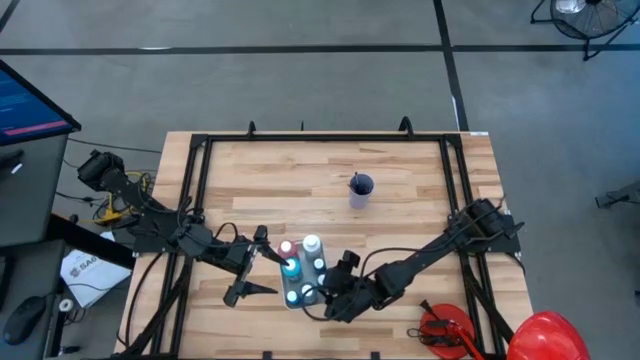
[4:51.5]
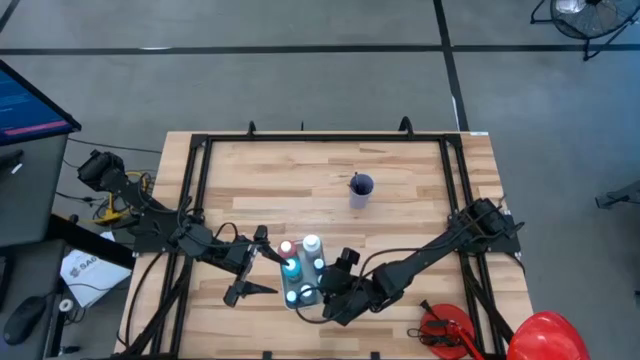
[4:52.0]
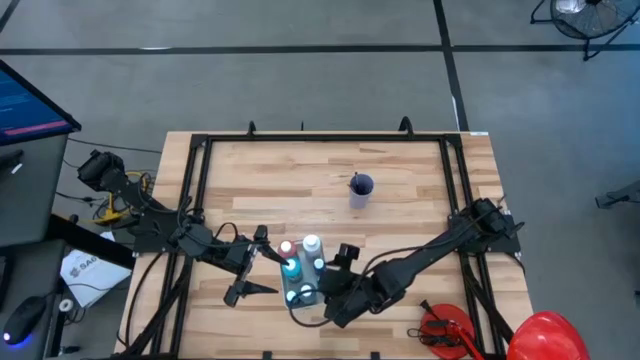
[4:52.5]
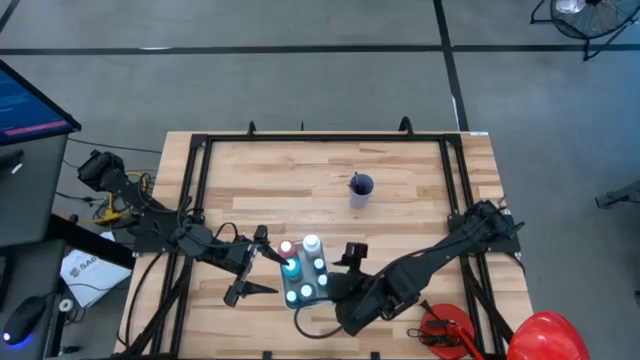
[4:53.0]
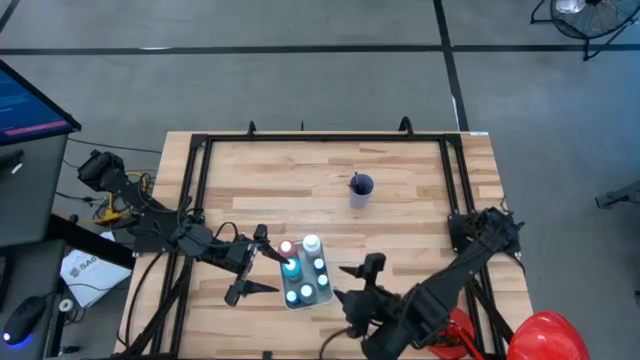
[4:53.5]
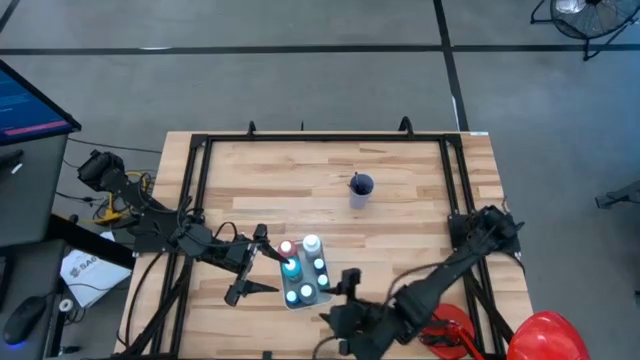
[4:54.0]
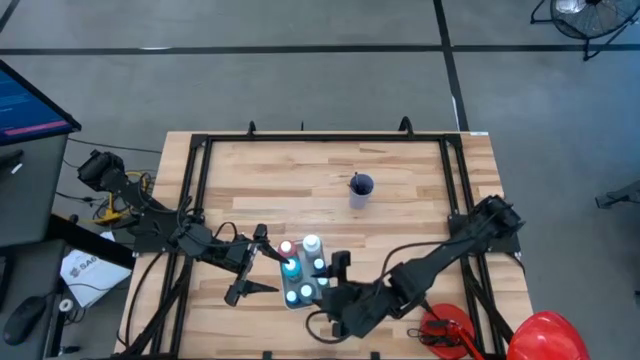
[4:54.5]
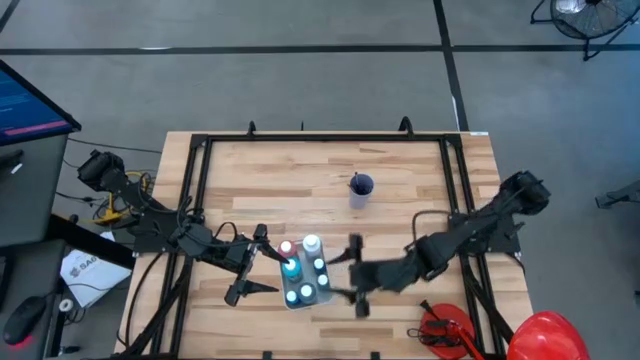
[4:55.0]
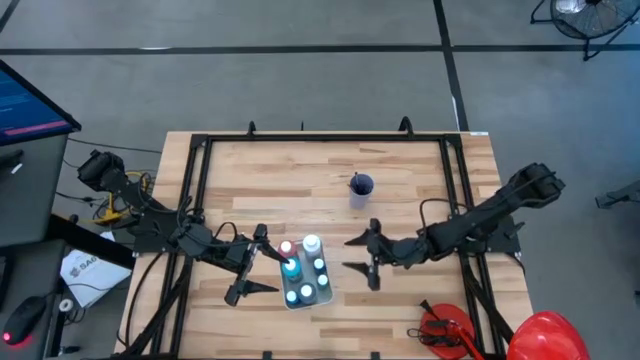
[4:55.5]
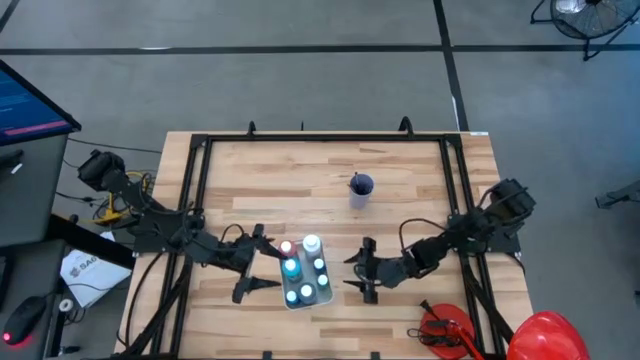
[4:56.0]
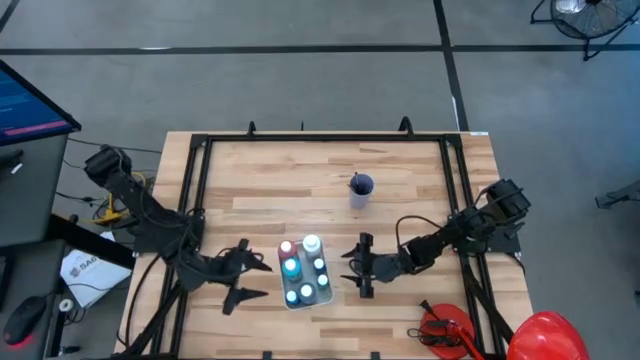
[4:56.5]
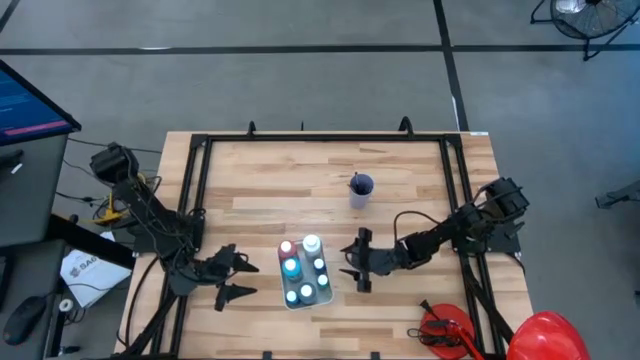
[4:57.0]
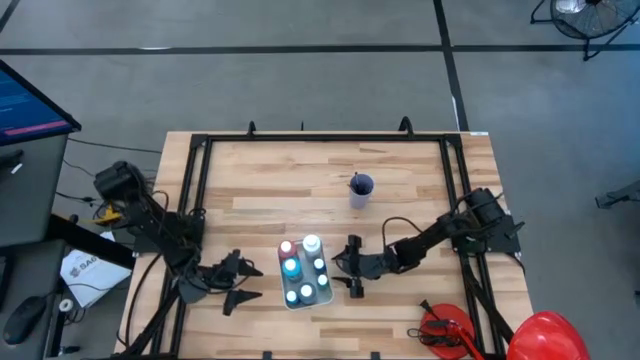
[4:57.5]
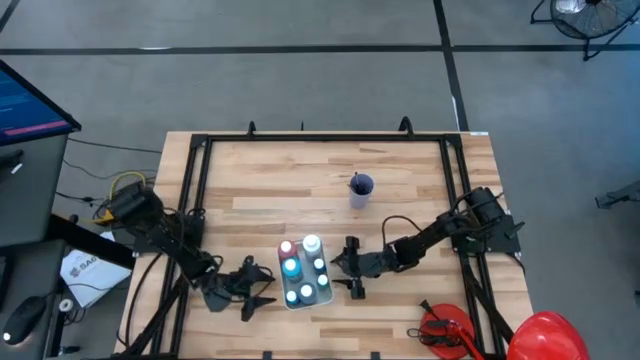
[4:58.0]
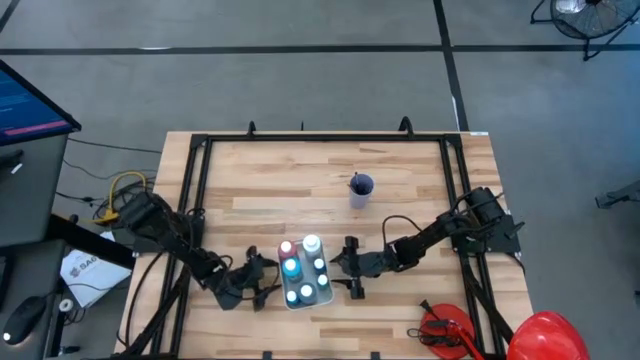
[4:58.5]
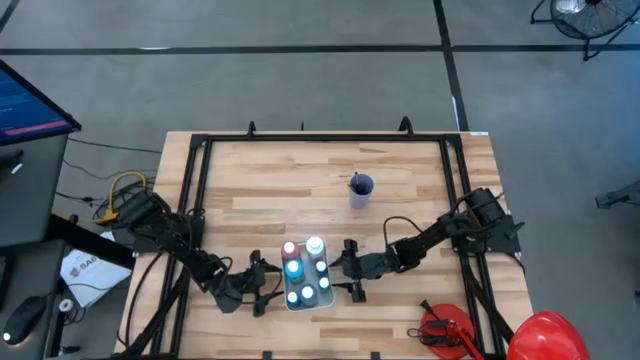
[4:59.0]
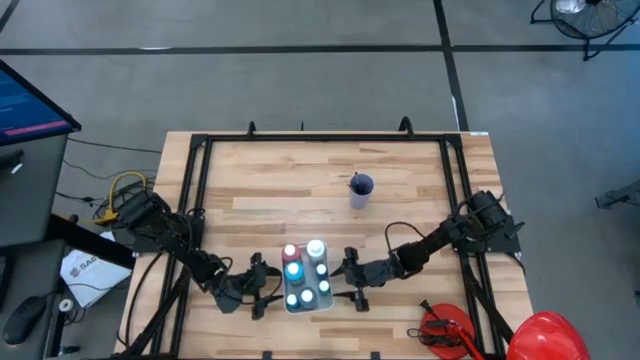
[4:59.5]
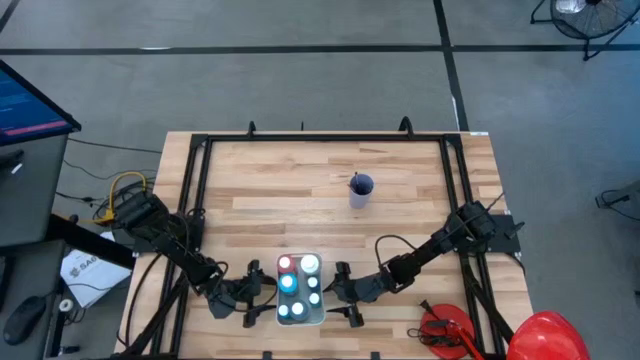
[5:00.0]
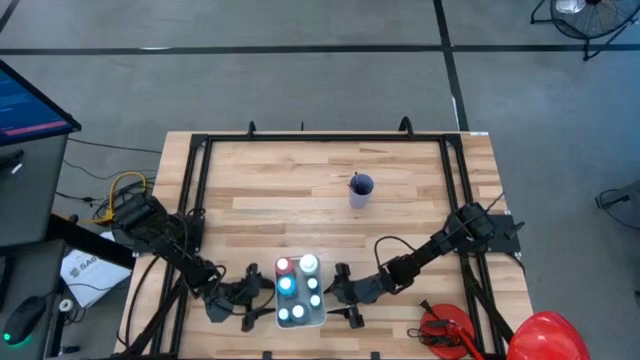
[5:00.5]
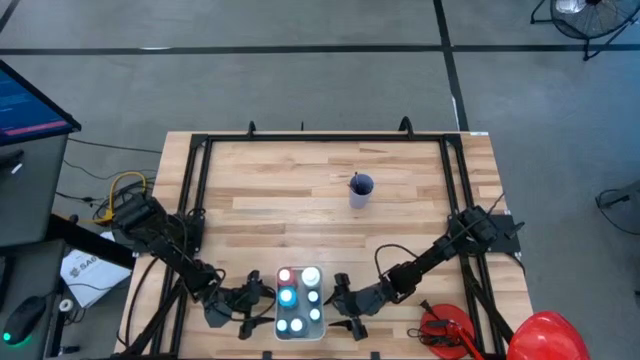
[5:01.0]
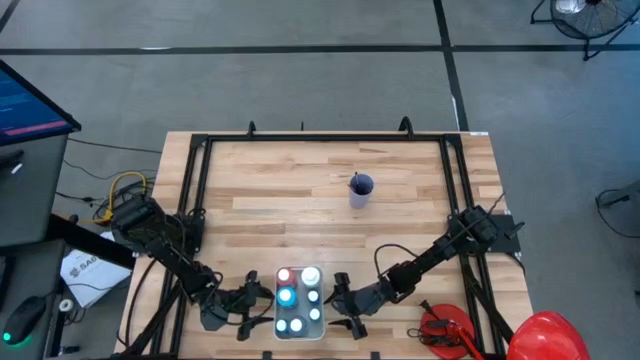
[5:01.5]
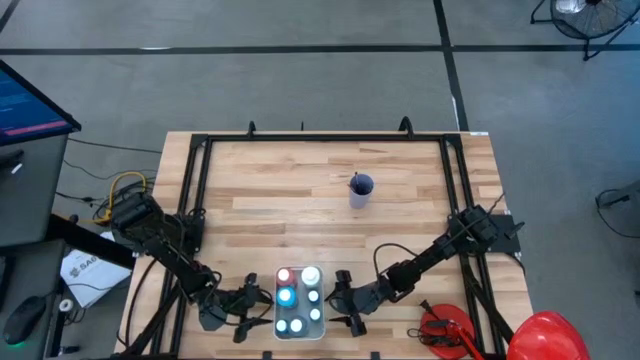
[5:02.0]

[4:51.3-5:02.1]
Task: Pick & Place Paint Supplies
Move the white bin to the bottom center of the table

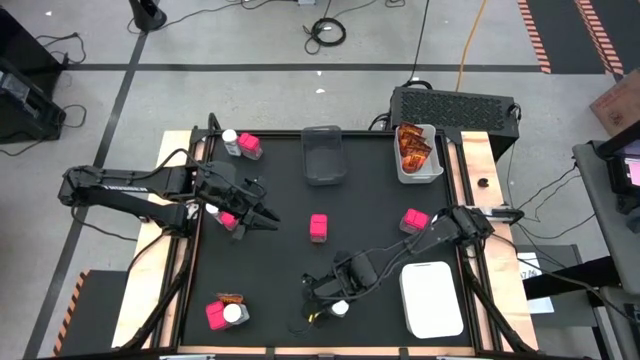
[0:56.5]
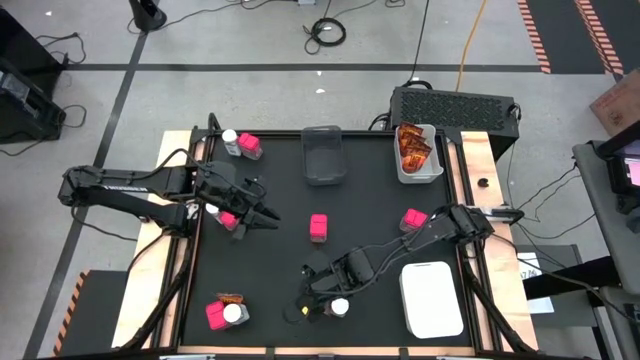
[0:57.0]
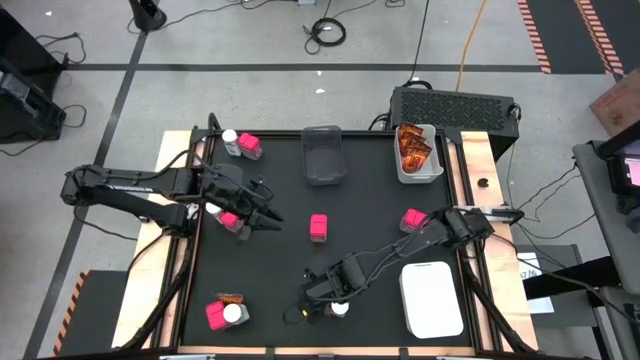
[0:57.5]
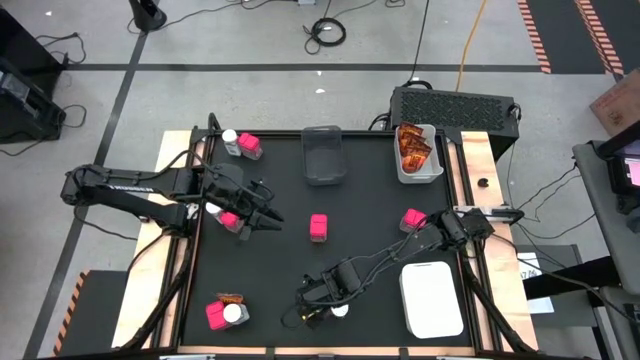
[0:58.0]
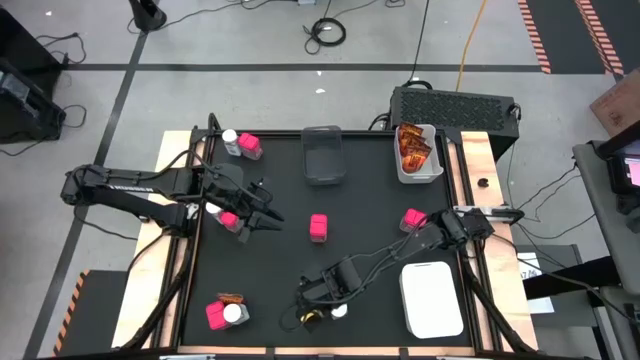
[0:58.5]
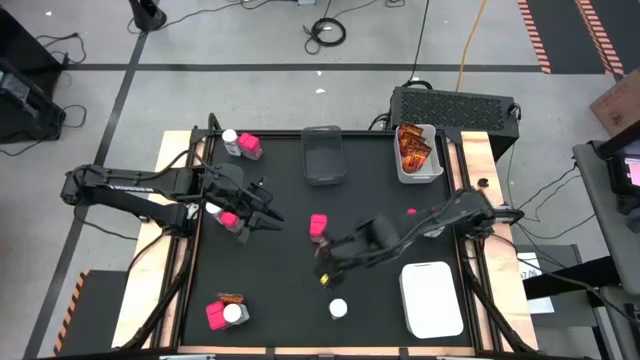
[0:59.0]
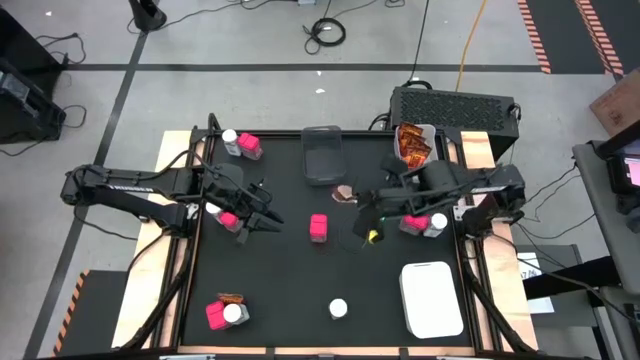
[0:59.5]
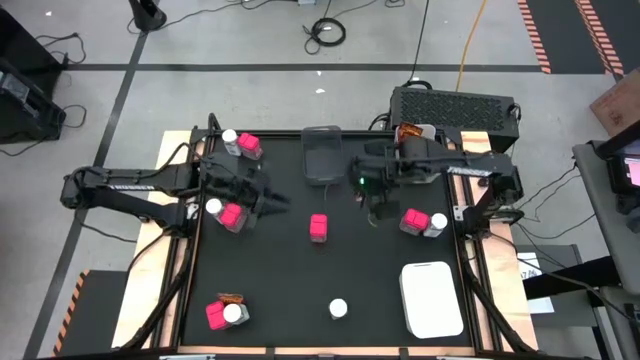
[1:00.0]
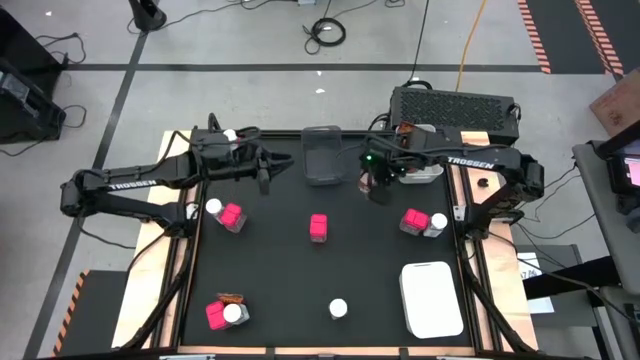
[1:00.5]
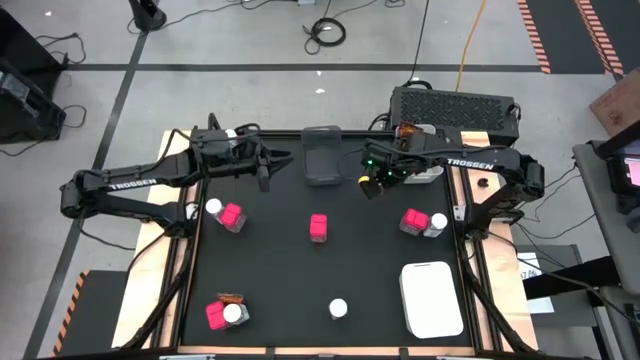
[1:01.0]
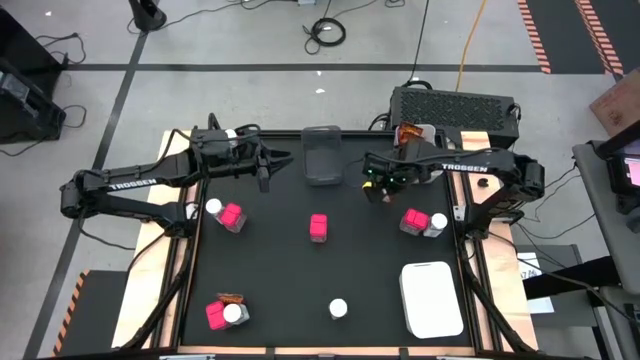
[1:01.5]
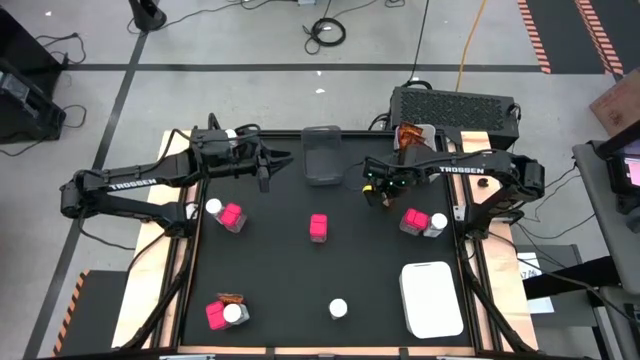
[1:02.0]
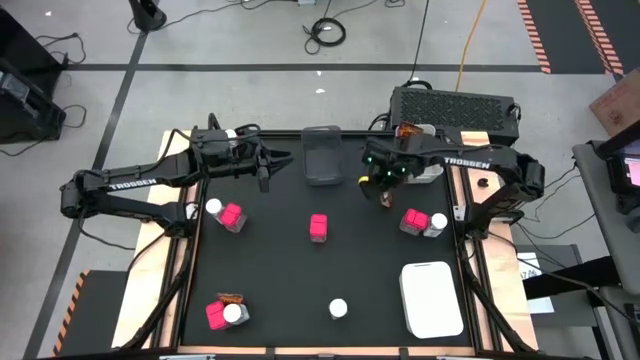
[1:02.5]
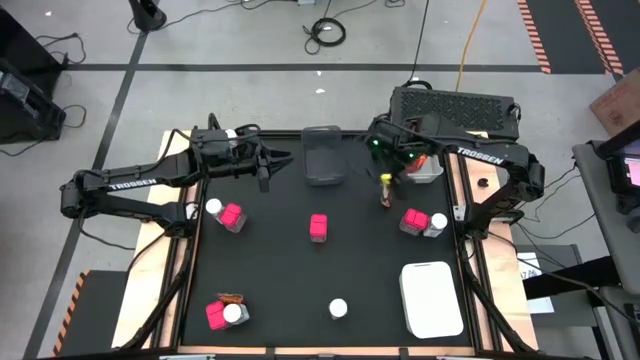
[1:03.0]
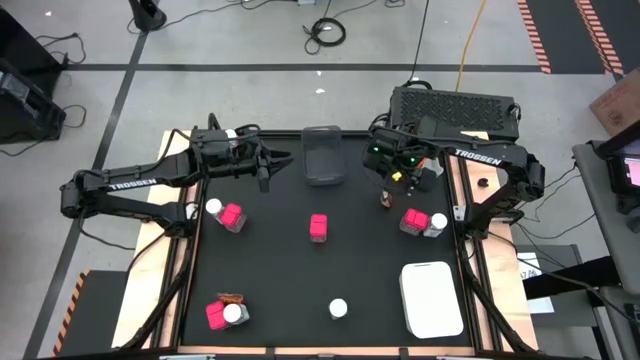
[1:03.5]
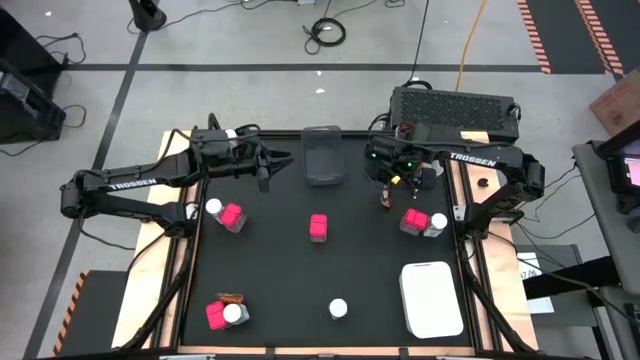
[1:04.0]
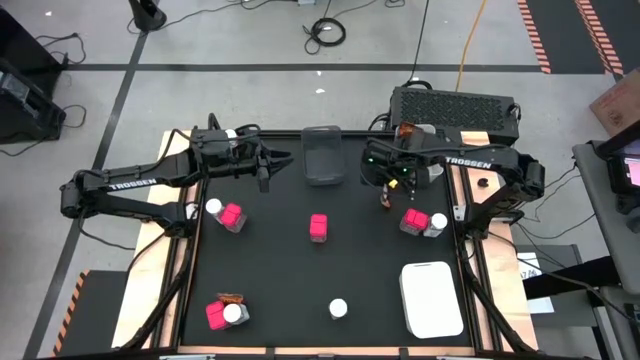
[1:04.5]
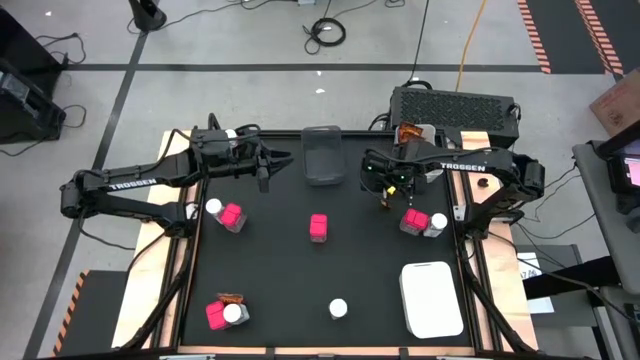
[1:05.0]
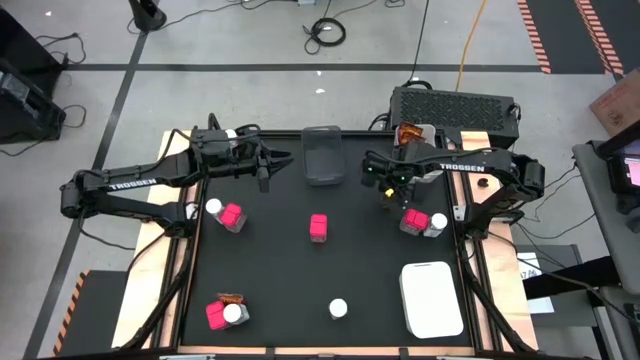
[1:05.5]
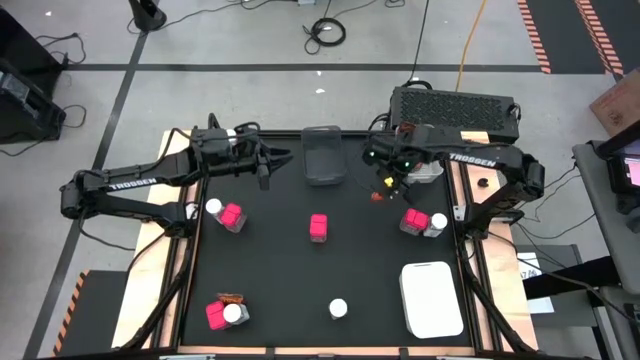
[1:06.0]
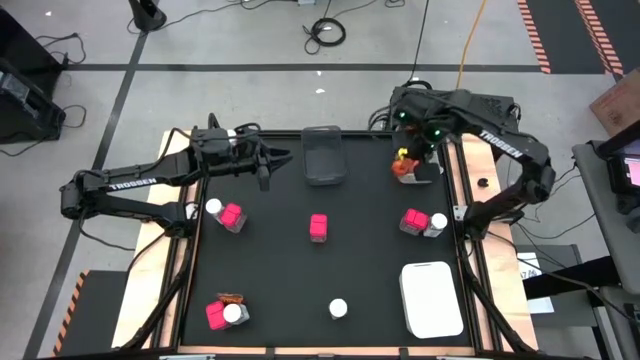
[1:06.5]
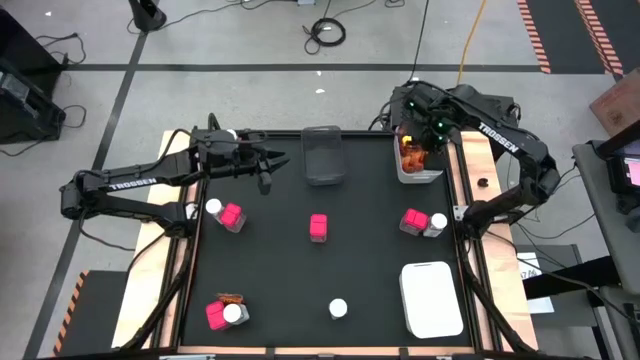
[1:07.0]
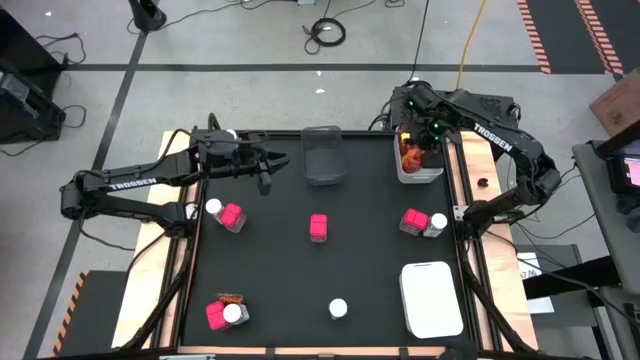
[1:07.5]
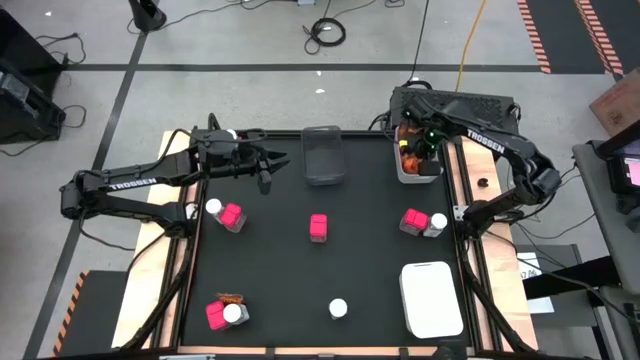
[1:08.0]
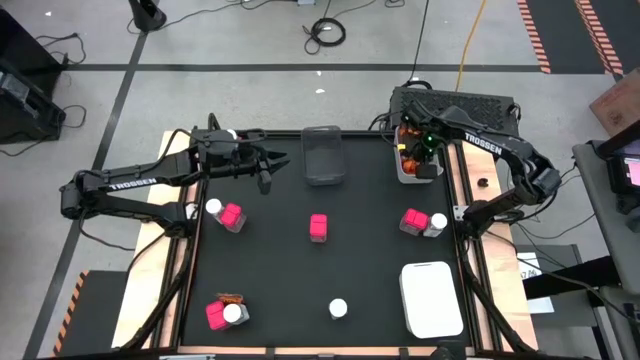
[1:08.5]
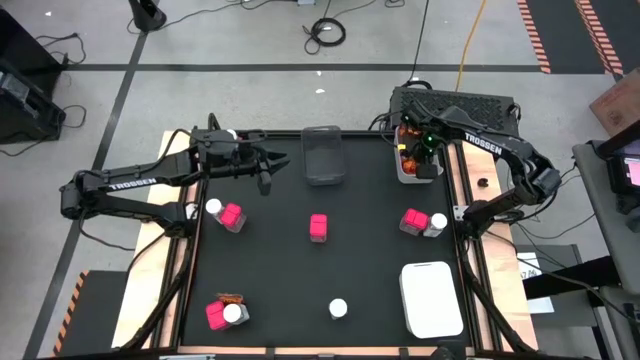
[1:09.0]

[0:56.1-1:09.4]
Task: Sort spices by type
Put the orange seasoning pack into the top white bin
